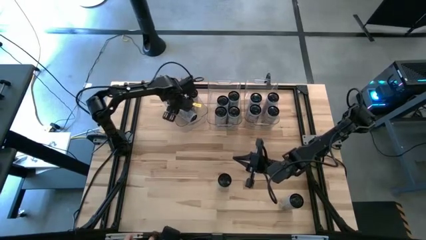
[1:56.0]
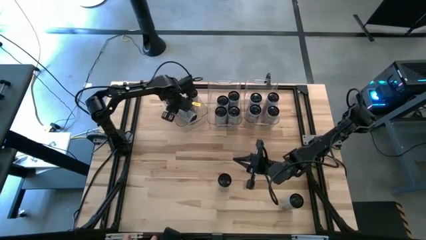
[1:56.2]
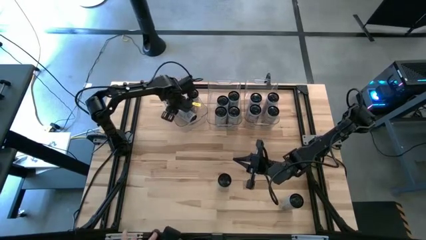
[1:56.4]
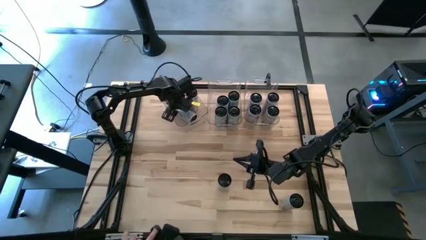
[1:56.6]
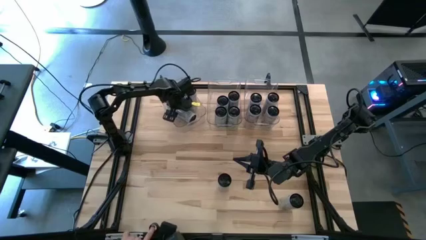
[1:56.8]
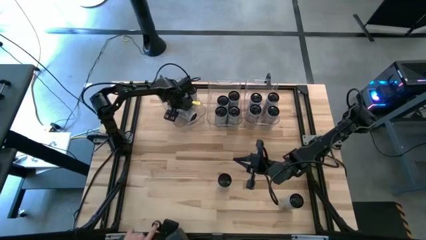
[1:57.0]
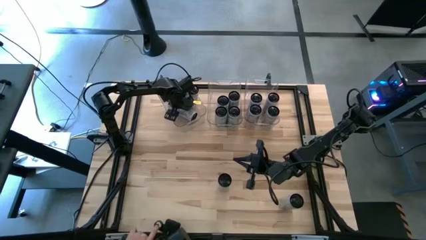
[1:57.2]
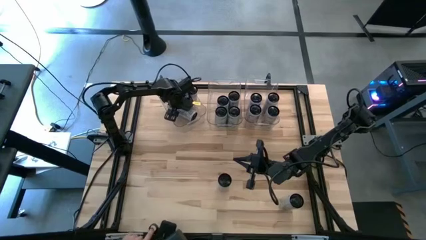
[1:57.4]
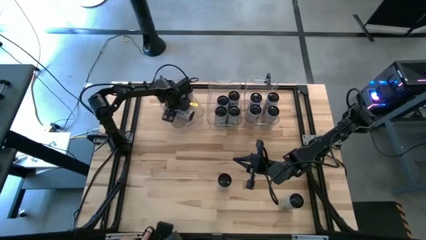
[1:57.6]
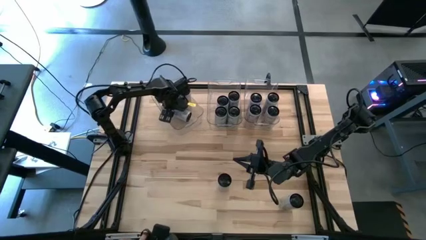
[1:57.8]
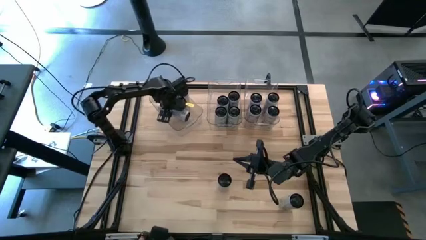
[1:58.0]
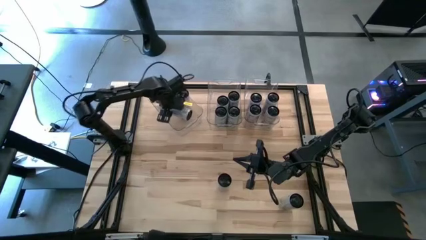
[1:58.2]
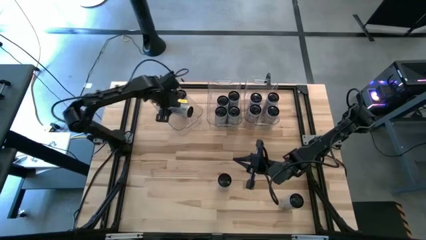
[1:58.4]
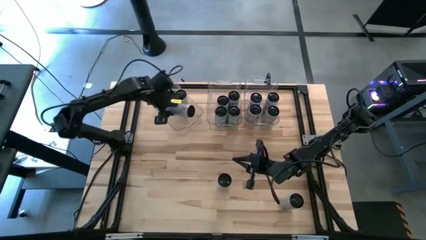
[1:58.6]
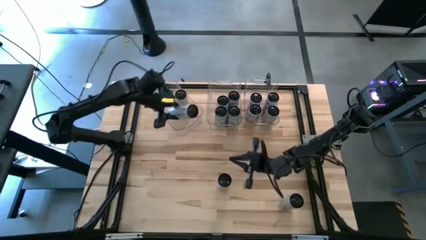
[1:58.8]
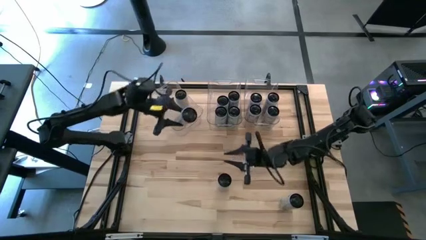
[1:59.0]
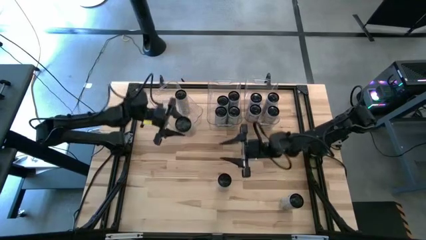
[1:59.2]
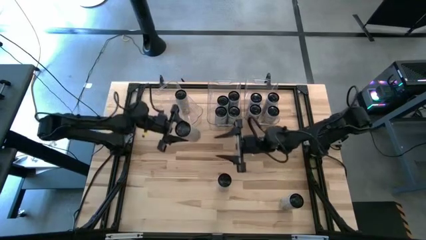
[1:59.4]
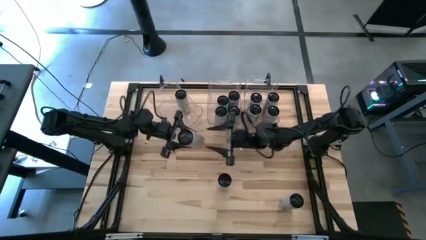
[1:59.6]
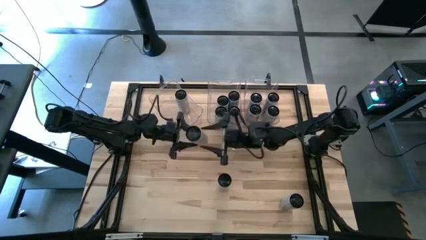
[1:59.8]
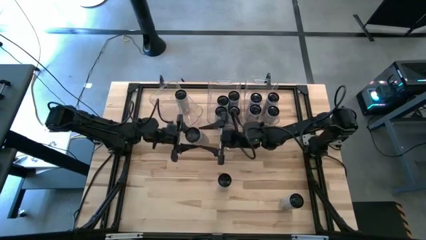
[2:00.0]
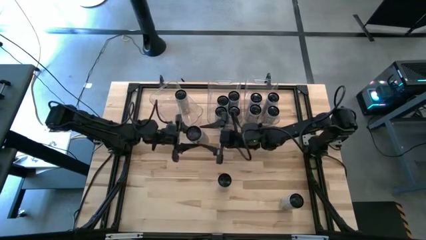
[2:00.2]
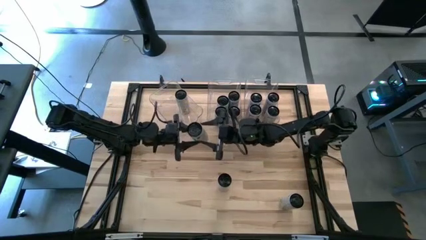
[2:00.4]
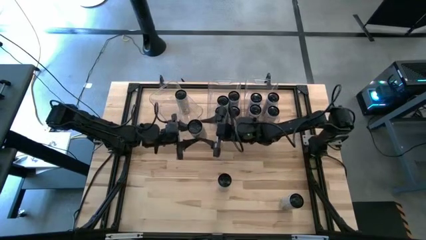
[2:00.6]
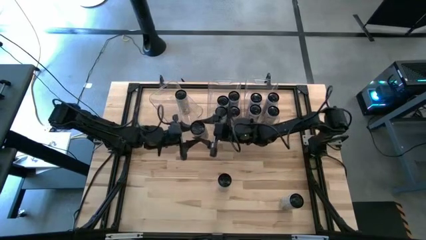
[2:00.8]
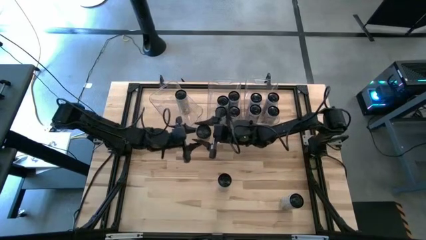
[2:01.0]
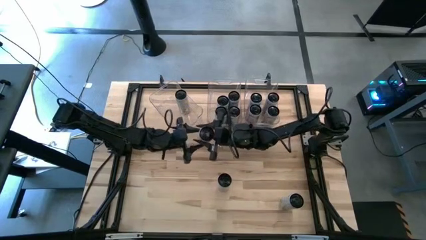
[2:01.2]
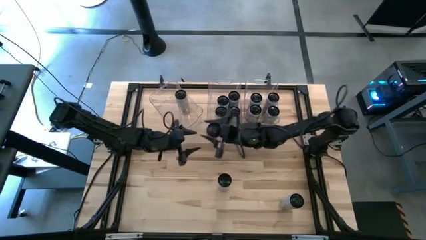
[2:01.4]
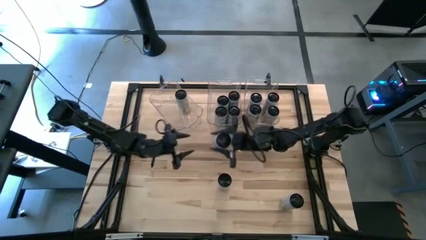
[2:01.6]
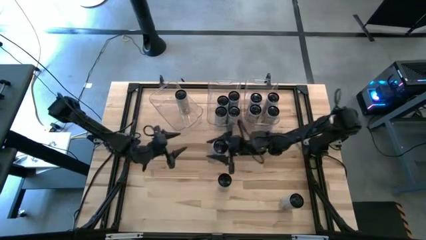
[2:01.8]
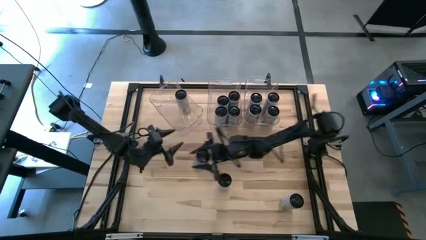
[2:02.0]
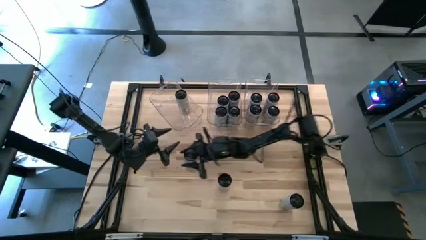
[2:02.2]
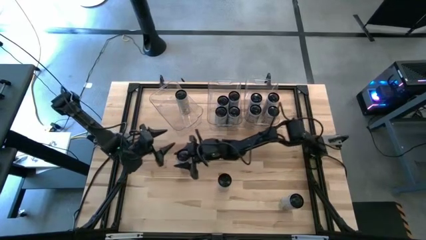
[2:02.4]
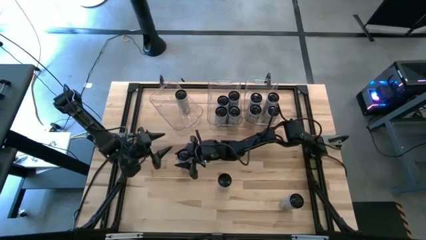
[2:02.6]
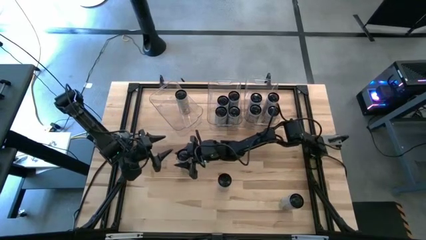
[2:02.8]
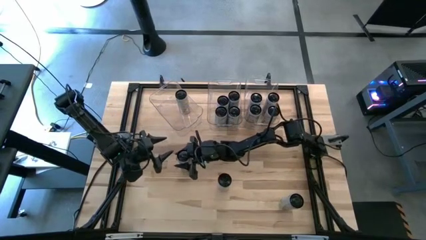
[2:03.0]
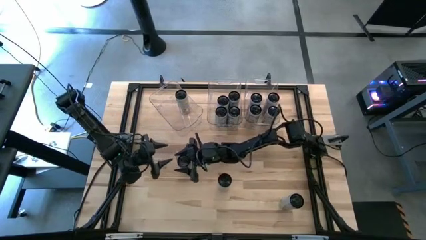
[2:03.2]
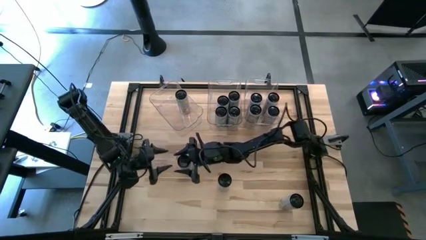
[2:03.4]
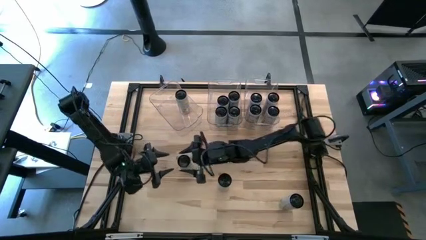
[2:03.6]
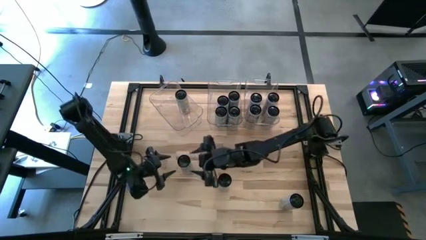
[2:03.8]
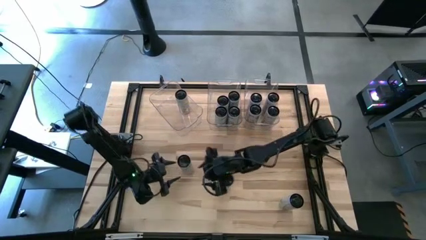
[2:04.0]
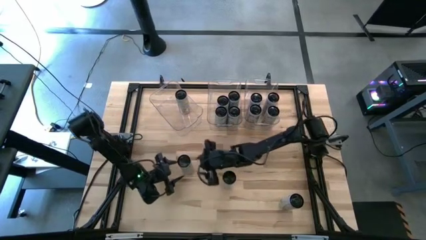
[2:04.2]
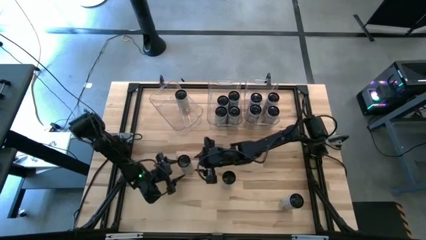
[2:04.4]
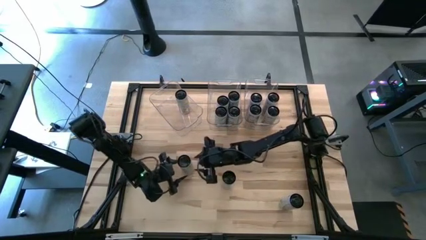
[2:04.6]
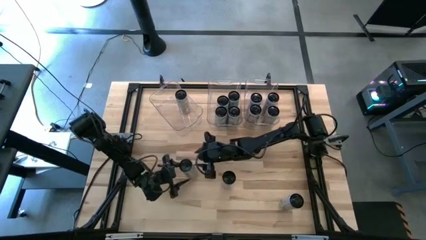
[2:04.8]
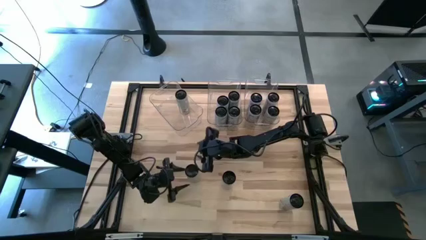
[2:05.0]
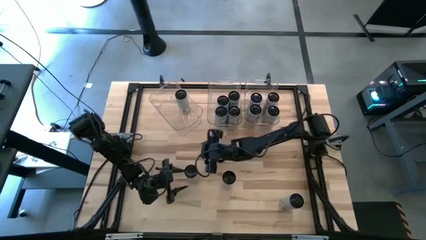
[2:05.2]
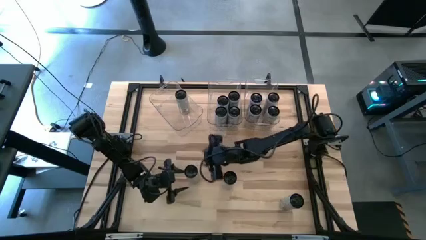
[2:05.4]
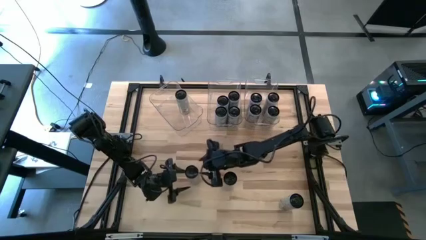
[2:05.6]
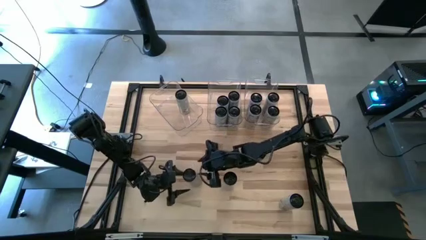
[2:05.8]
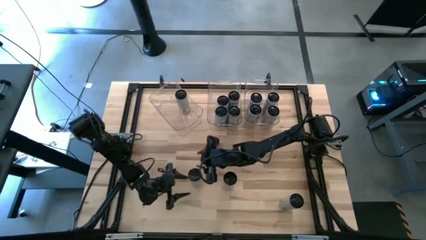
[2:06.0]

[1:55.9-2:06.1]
Task: Sort soda cans
Remove the white-yellow soda can from the left transparent bin

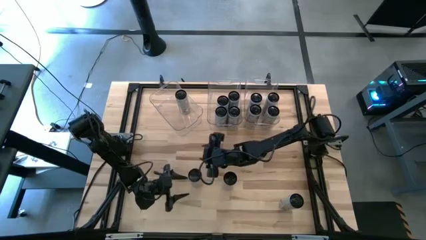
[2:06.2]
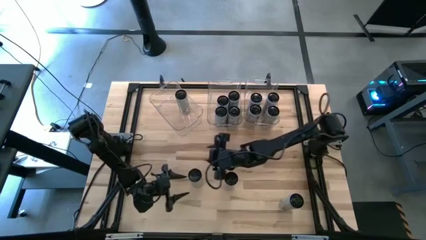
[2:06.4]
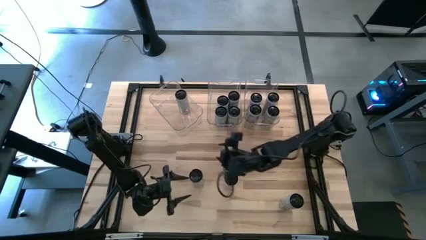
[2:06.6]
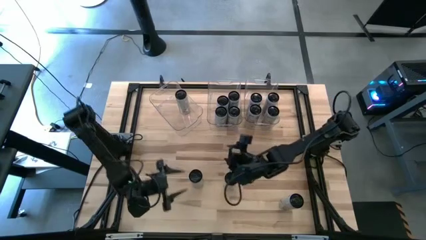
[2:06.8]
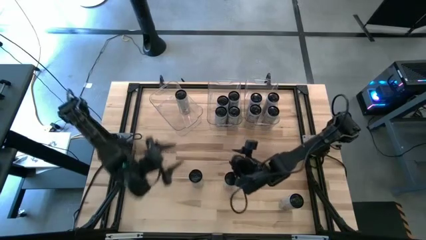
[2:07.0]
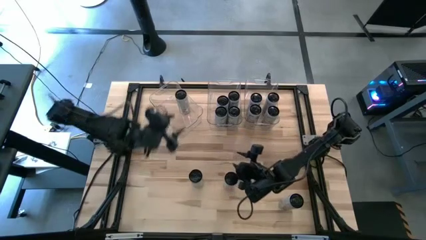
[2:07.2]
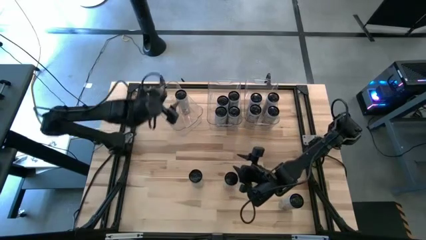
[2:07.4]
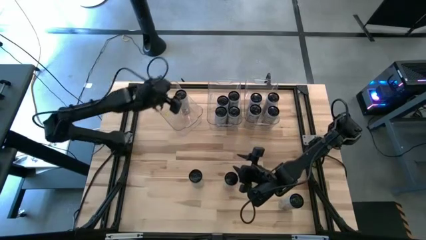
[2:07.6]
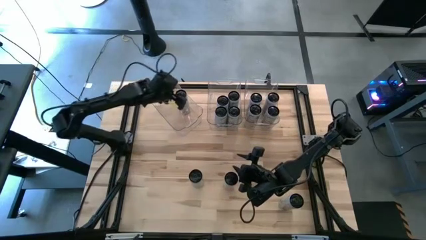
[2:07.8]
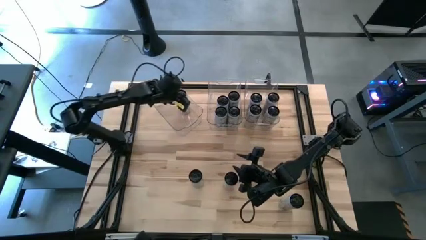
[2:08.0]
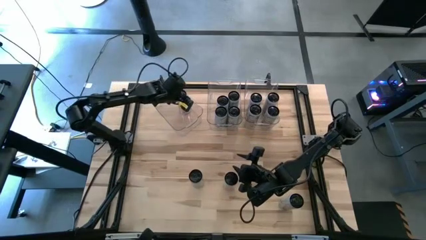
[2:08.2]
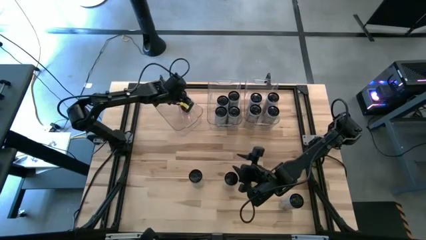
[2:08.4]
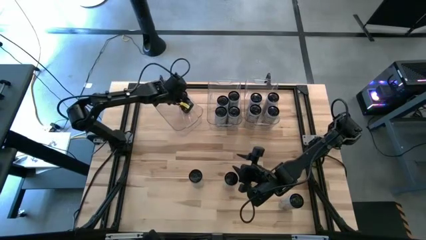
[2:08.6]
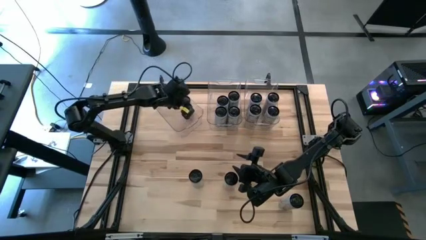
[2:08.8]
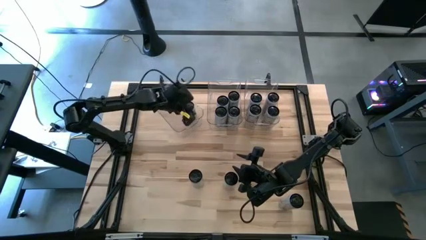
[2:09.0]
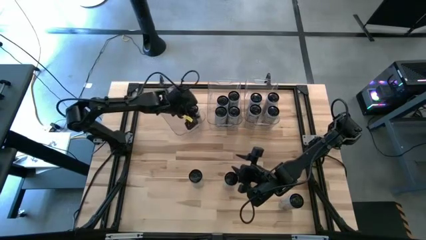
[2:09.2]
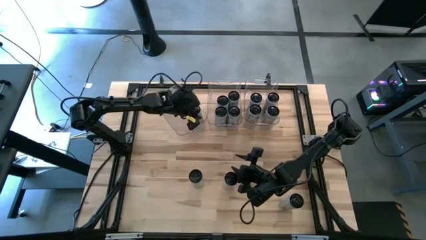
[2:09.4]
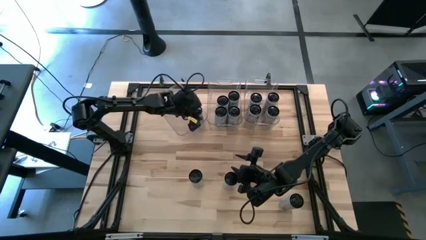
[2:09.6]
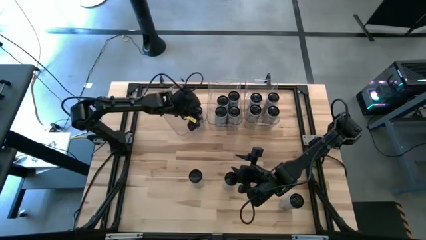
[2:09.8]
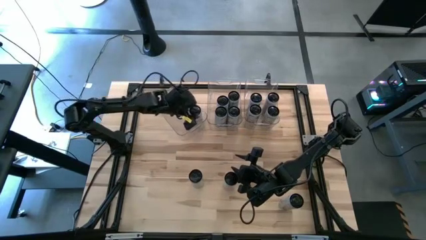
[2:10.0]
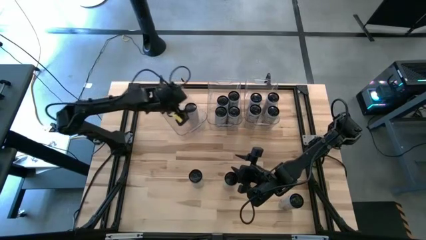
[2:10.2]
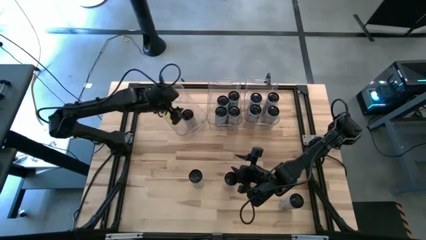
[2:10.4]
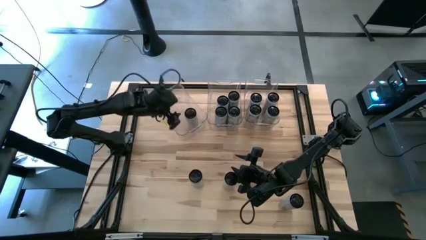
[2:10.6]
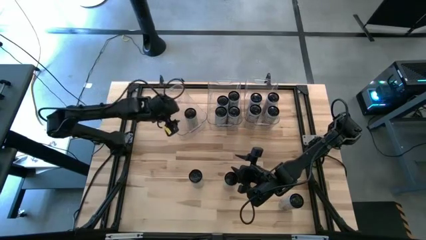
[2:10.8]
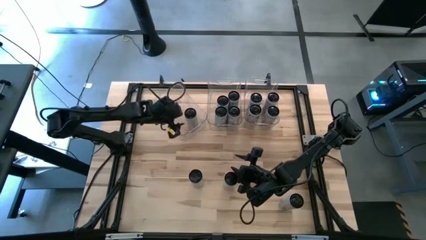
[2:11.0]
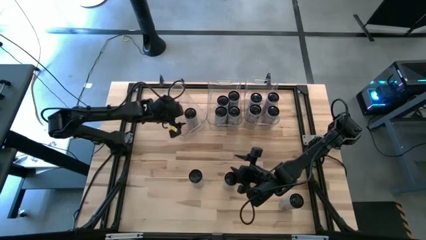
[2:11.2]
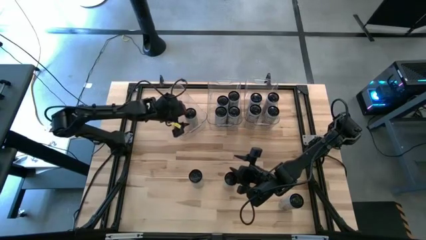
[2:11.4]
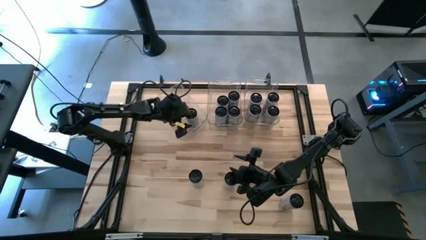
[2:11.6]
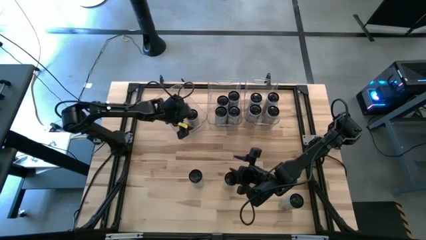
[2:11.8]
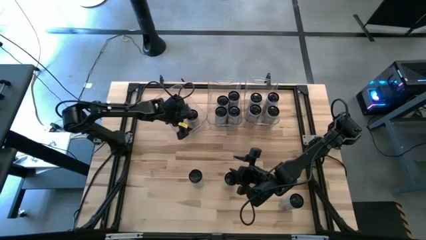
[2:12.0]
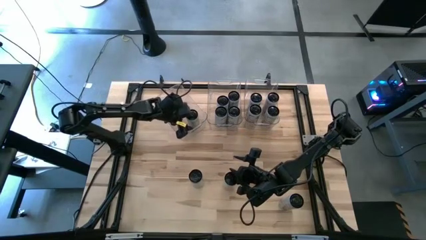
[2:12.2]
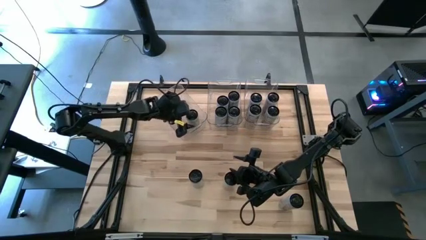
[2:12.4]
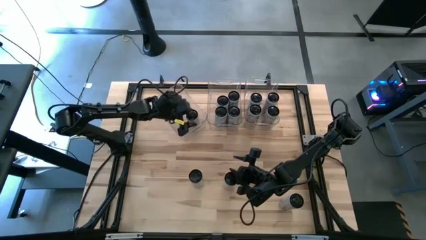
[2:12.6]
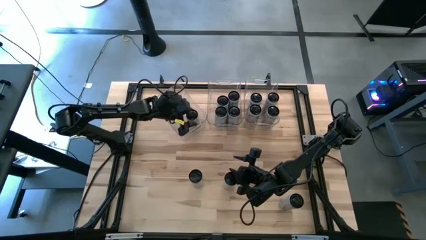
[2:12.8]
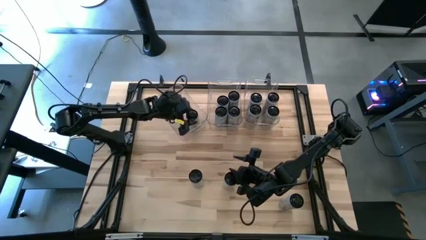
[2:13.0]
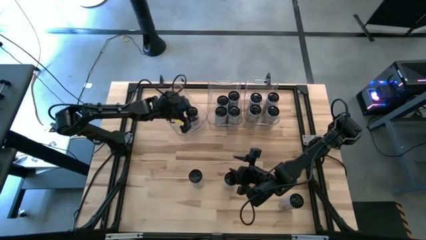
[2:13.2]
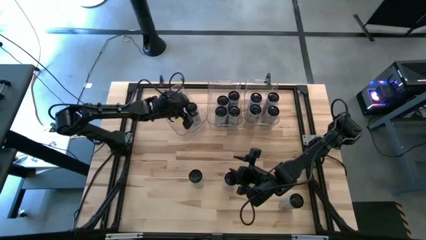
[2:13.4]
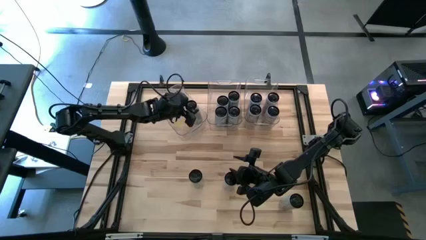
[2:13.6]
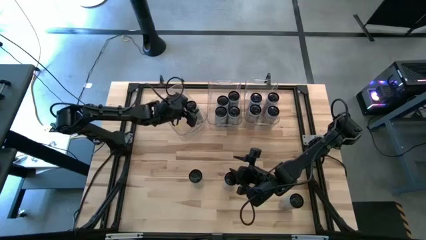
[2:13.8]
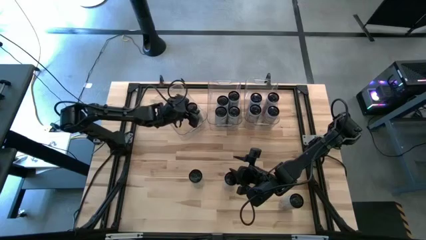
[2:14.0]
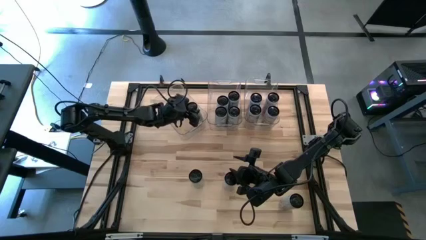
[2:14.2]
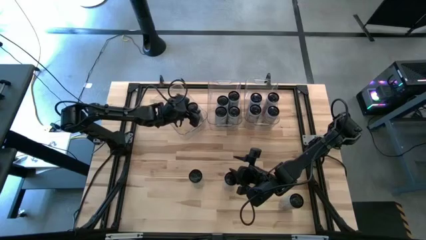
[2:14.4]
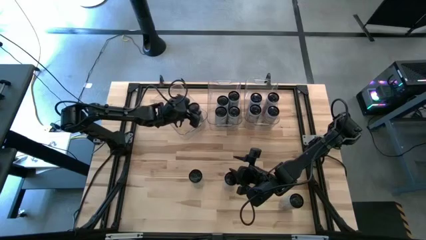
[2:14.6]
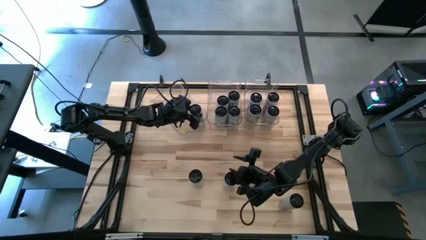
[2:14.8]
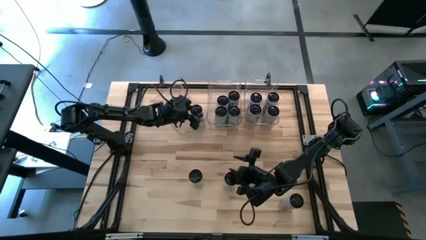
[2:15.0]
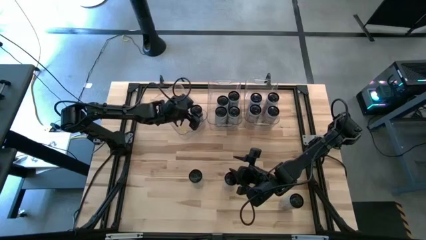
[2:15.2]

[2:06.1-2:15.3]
Adjust the white-yellow soda can on the left transparent bin
